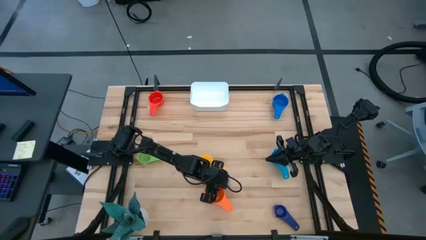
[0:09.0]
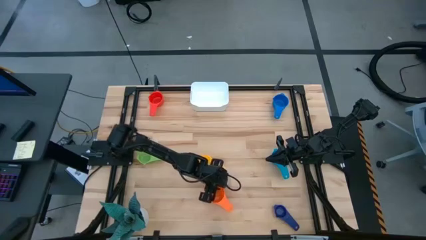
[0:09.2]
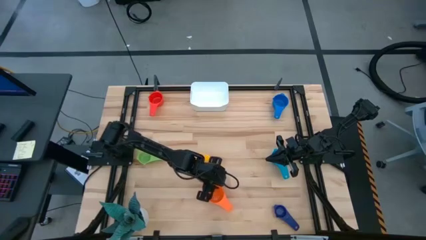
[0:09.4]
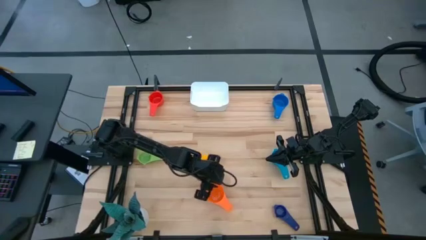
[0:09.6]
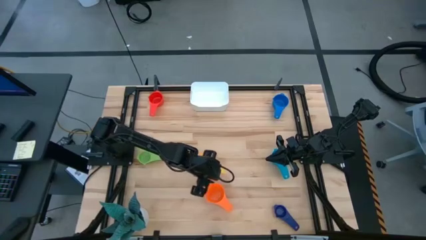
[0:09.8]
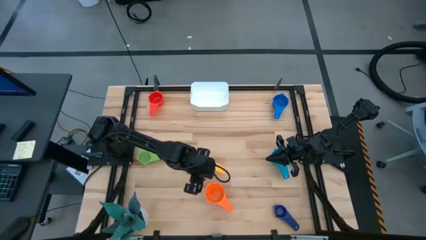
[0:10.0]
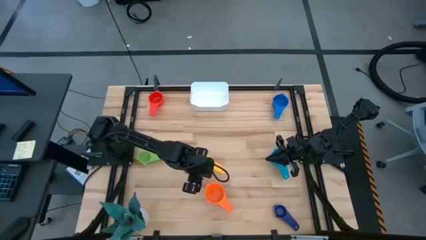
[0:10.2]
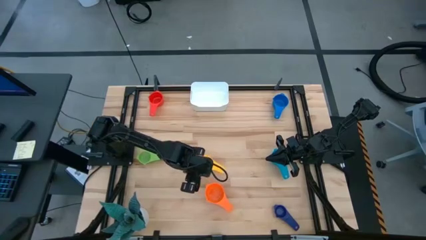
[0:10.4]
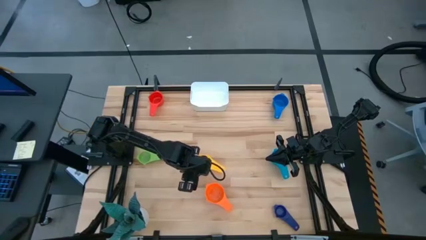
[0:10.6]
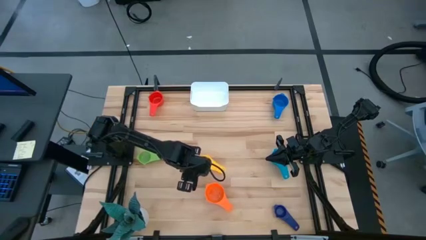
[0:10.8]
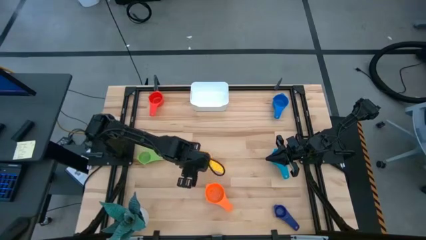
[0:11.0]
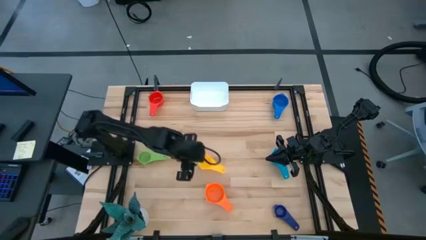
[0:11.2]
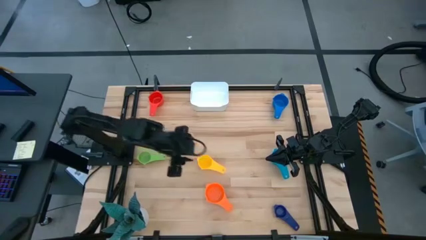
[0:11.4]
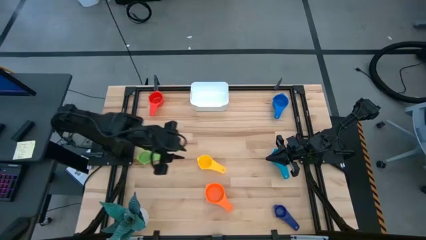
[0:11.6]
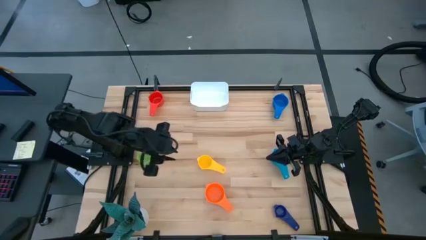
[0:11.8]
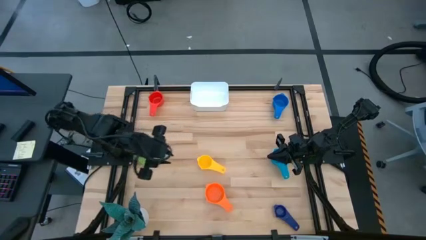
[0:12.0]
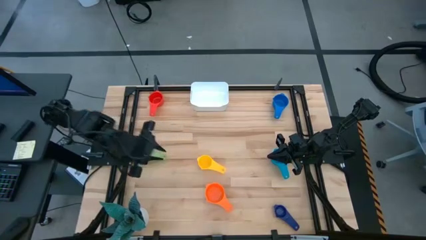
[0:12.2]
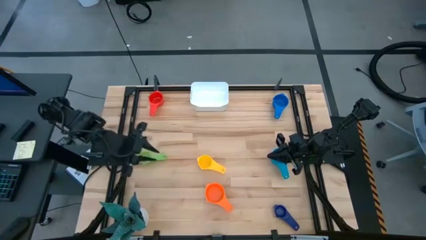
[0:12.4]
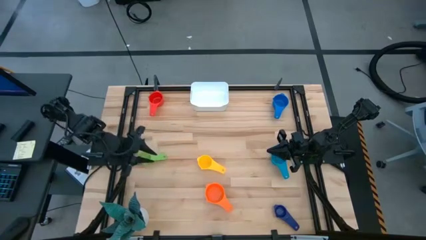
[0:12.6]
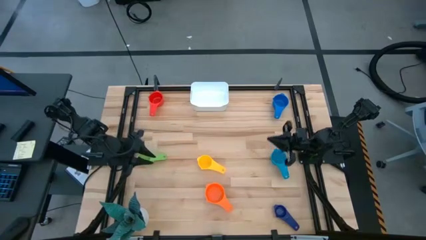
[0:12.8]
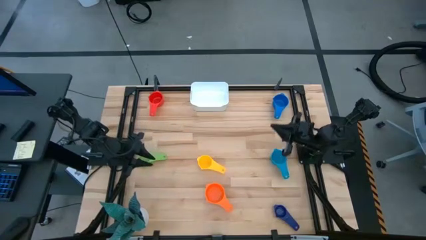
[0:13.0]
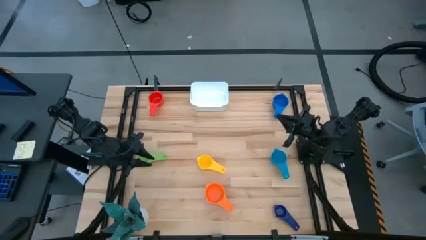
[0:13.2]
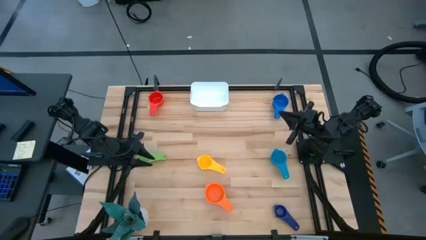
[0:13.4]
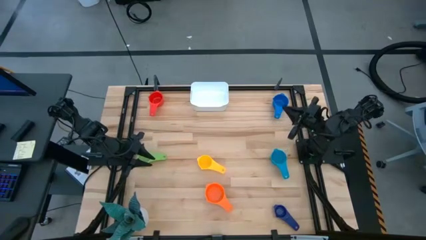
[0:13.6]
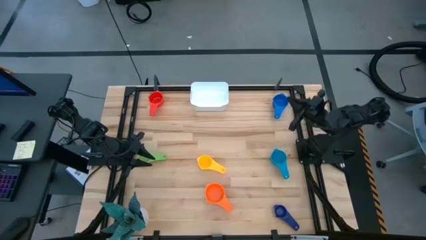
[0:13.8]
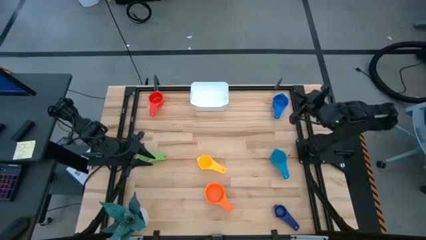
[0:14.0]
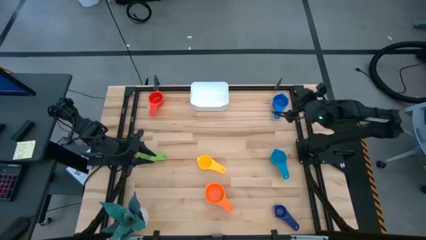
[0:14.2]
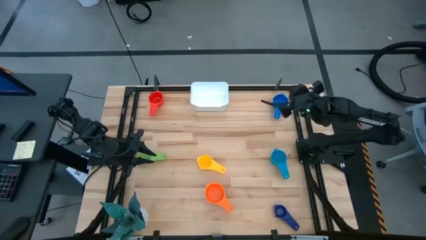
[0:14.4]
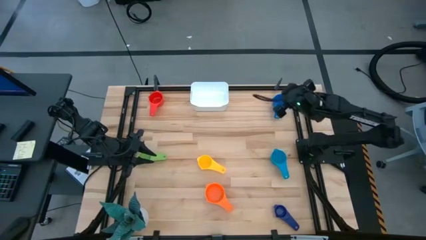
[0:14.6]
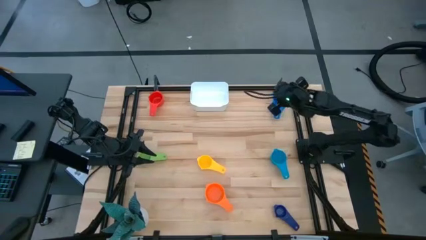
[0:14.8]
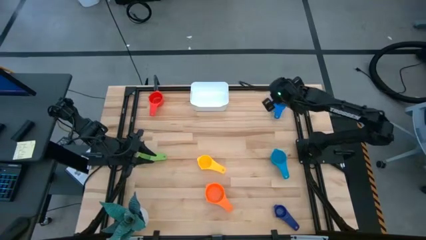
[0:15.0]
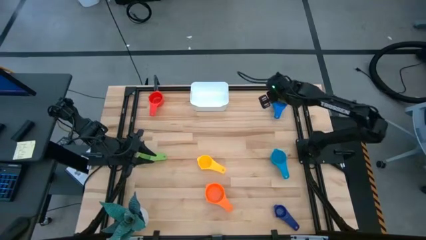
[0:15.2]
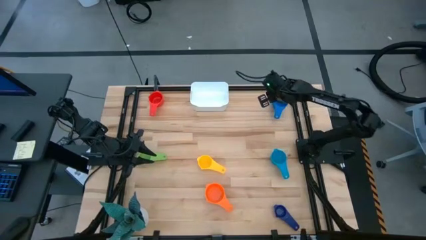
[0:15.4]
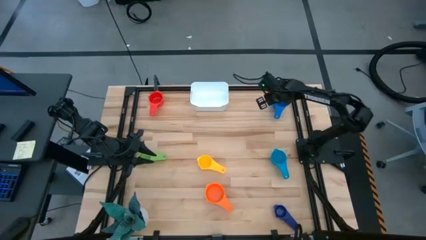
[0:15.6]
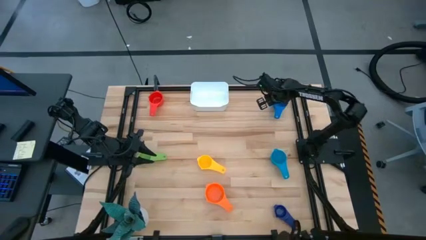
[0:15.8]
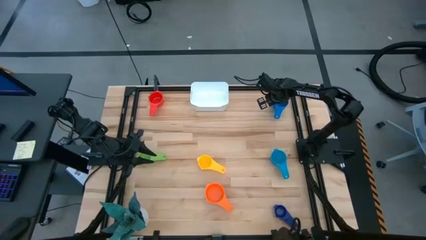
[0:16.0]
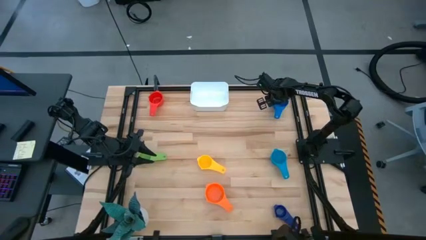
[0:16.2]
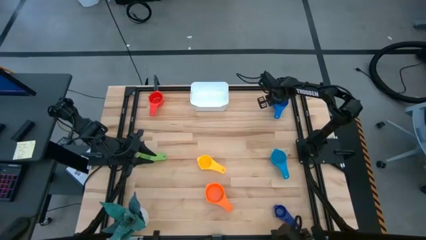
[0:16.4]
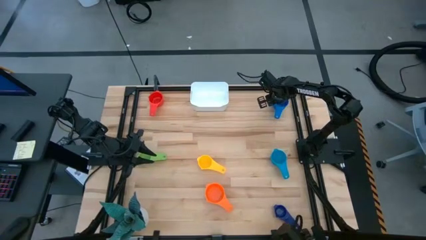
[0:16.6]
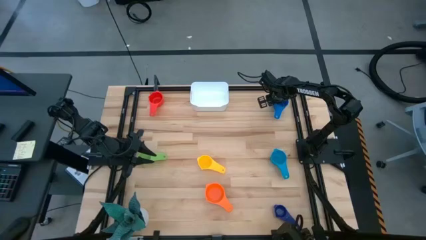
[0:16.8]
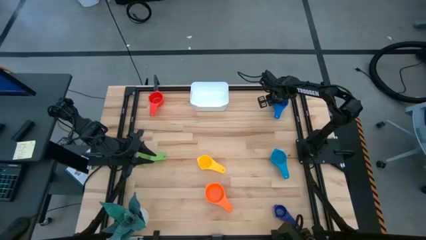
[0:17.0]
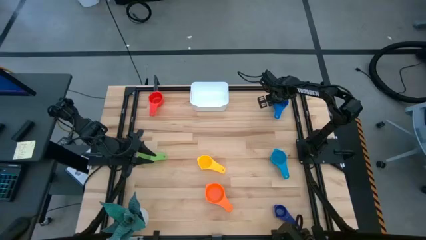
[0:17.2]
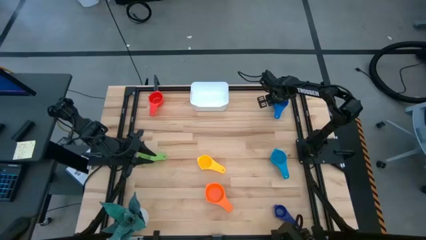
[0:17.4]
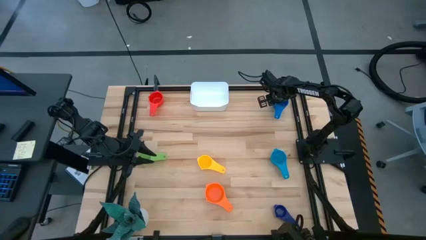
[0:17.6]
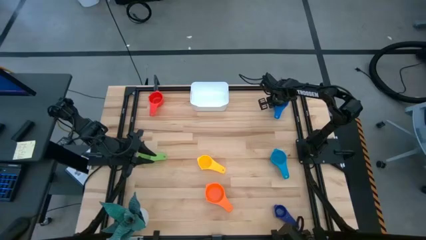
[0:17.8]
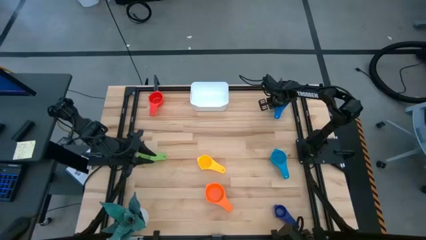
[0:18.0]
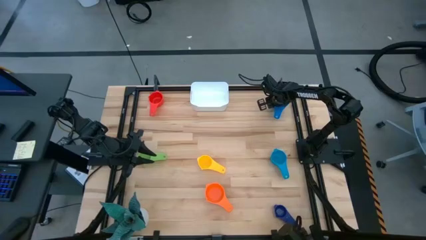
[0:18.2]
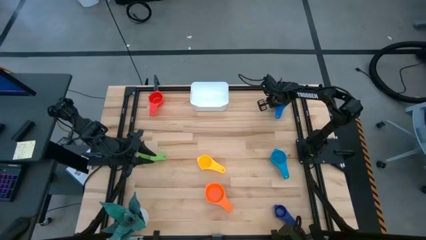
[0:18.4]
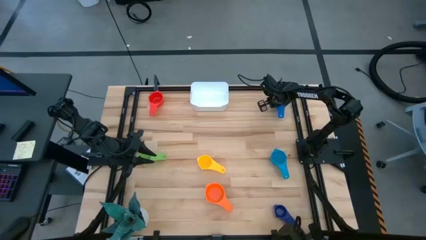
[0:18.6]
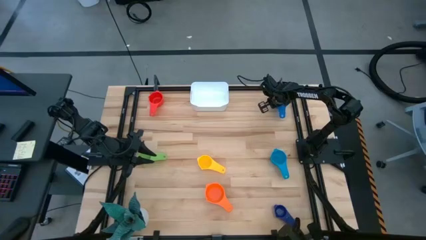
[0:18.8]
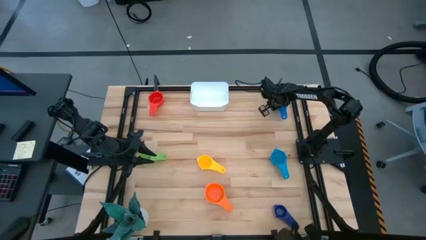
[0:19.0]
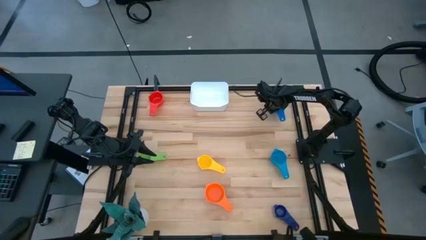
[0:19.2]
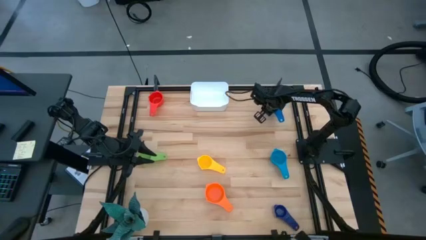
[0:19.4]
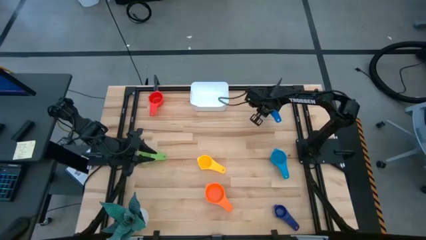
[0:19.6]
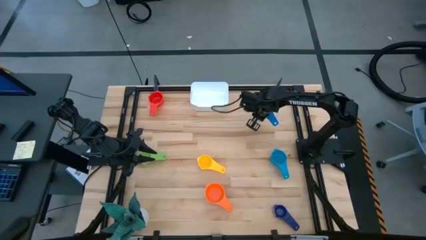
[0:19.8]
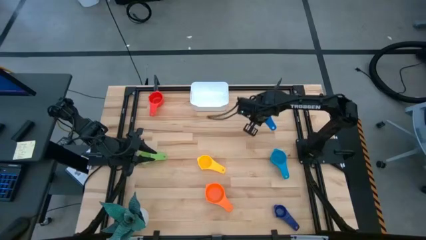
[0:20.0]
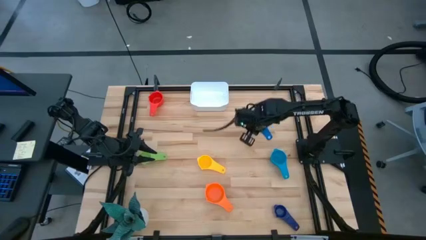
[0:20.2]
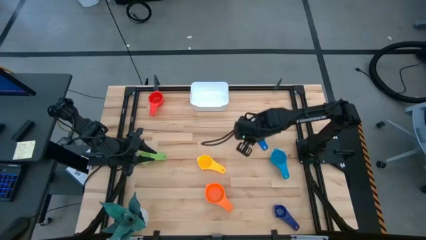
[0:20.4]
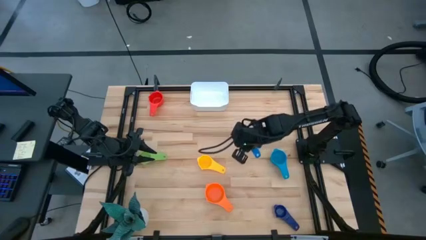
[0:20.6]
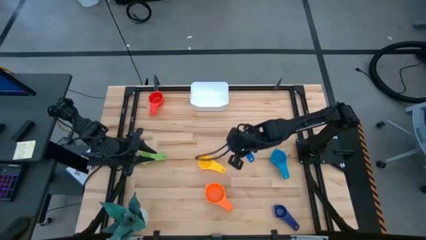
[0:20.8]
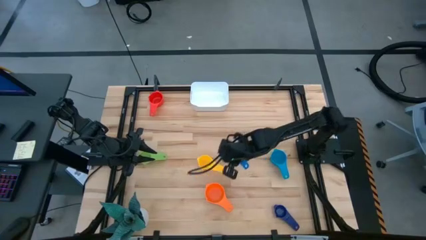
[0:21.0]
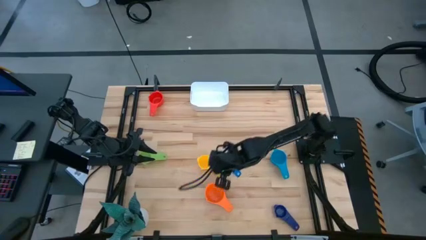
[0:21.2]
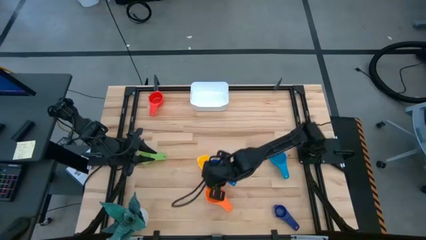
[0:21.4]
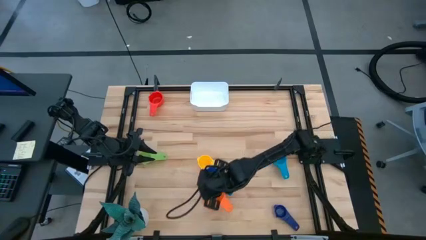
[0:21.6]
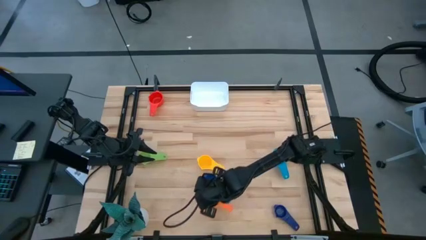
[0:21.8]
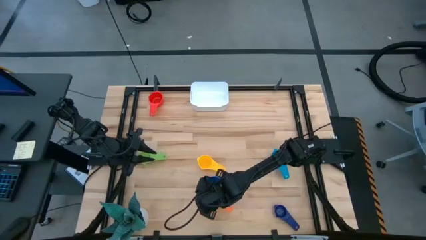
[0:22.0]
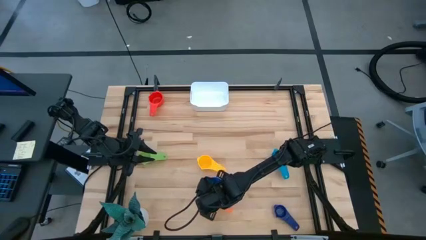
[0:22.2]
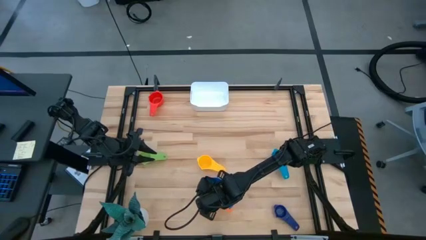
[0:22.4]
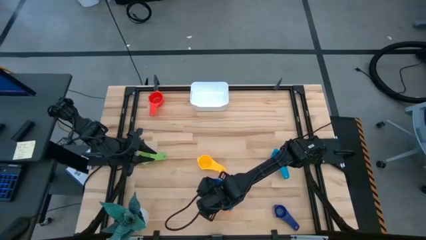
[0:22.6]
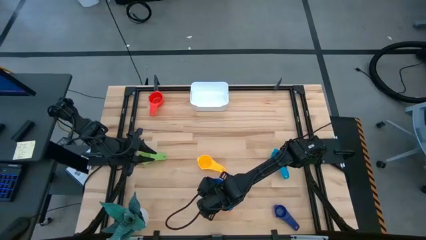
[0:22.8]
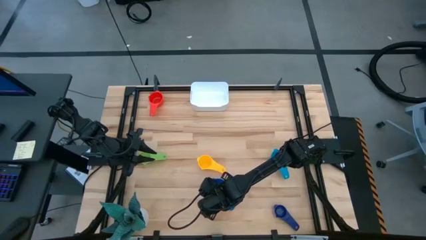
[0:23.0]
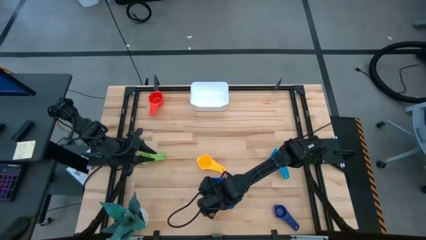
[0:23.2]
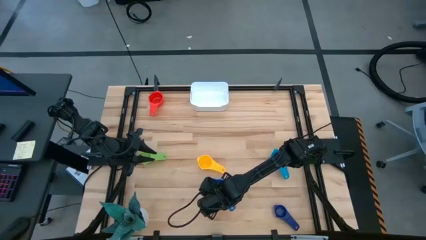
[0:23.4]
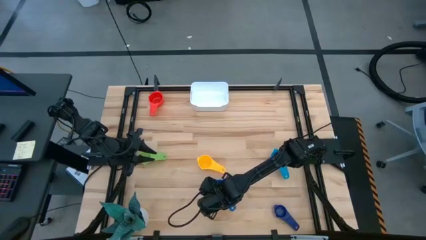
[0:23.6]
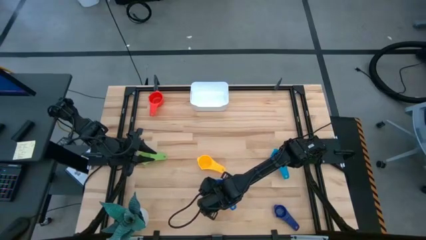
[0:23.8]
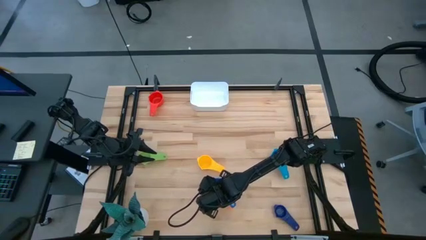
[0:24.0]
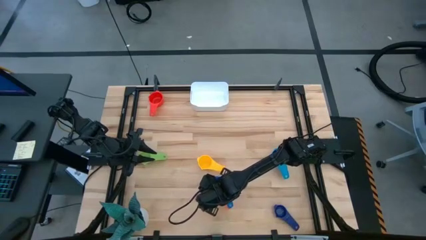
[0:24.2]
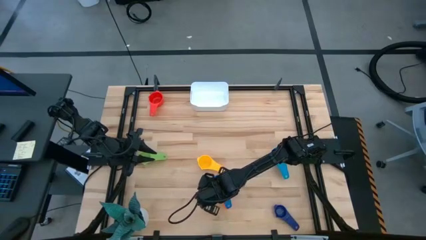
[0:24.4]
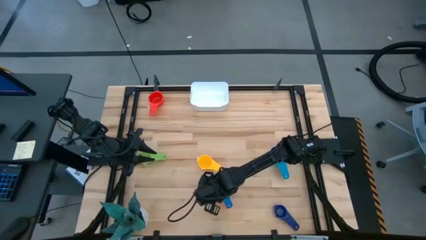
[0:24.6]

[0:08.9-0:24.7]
Task: Nest measuring cups in basket
Stack the blue measuring cup on top of the orange measuring cup
